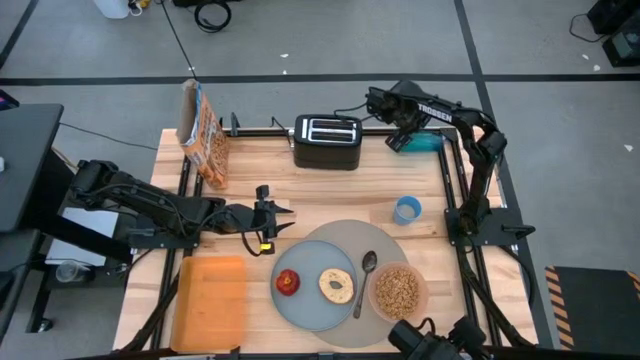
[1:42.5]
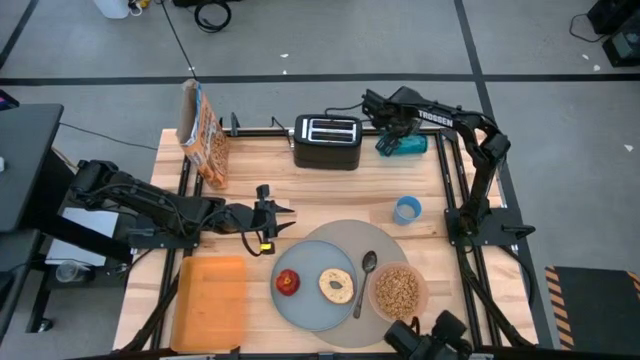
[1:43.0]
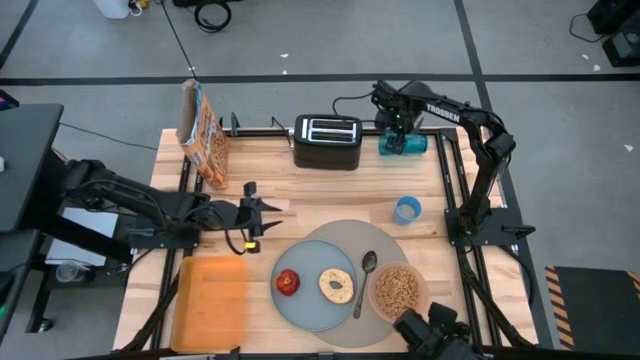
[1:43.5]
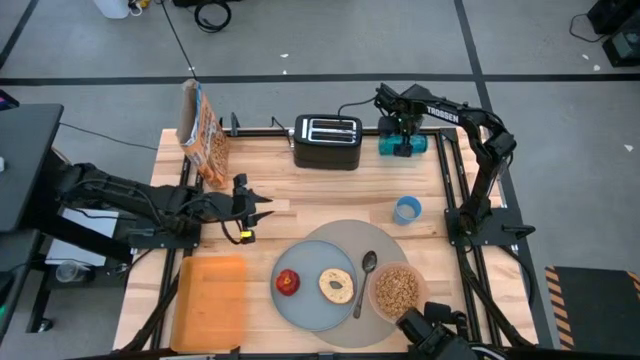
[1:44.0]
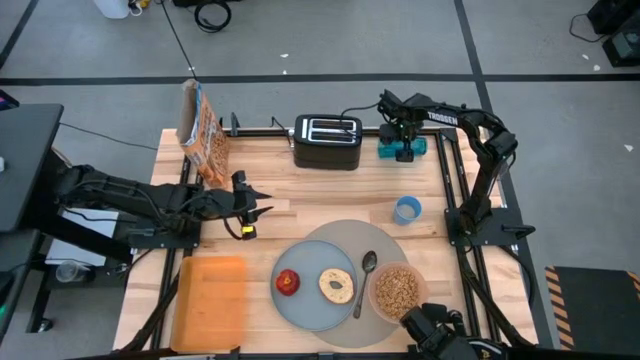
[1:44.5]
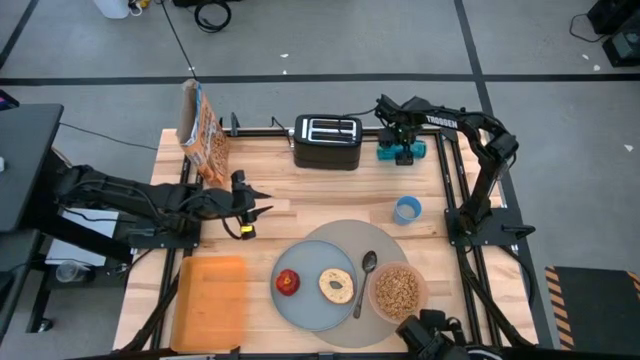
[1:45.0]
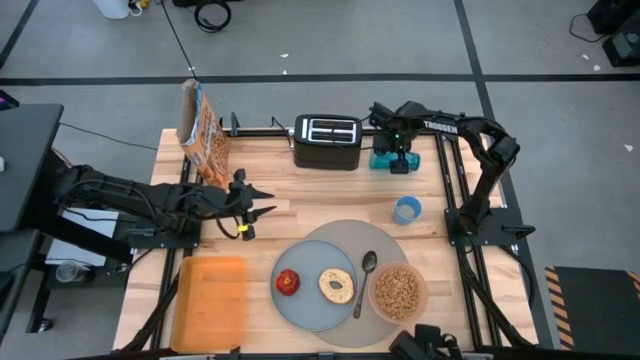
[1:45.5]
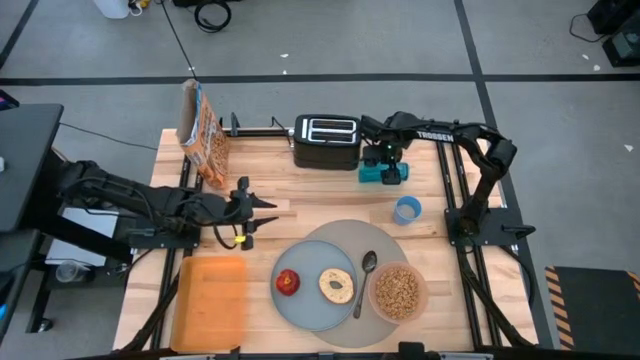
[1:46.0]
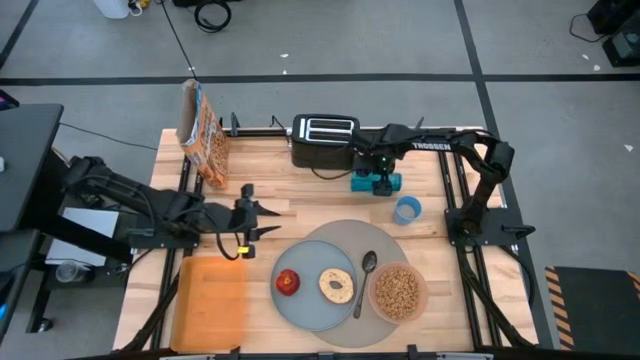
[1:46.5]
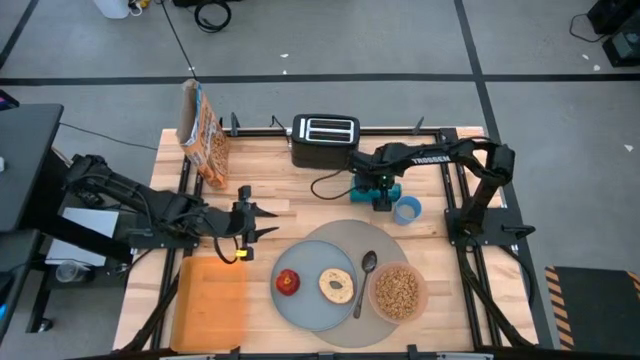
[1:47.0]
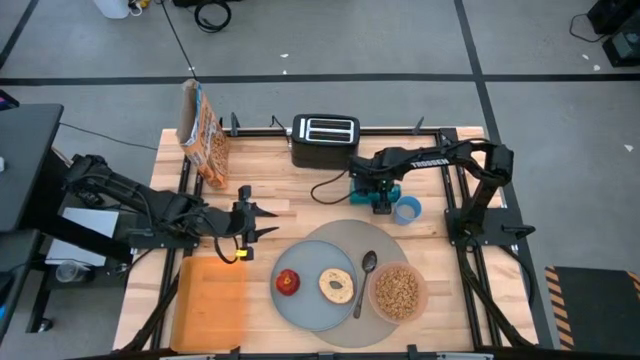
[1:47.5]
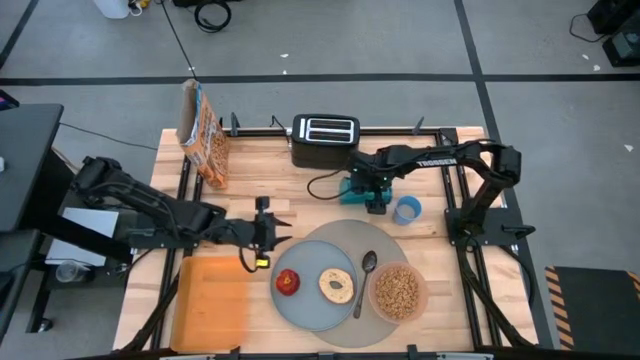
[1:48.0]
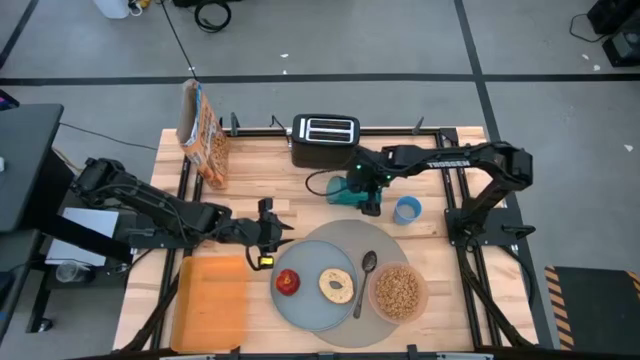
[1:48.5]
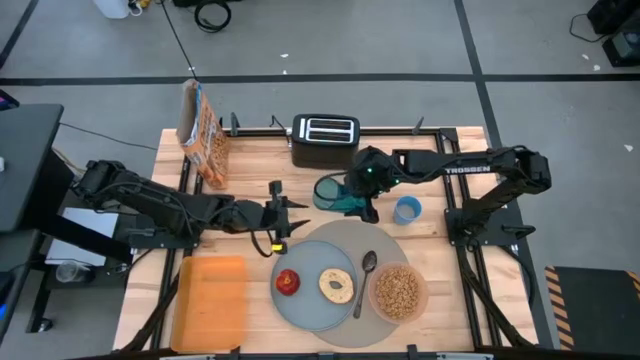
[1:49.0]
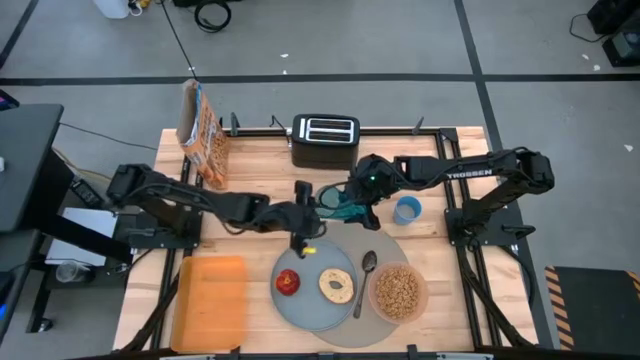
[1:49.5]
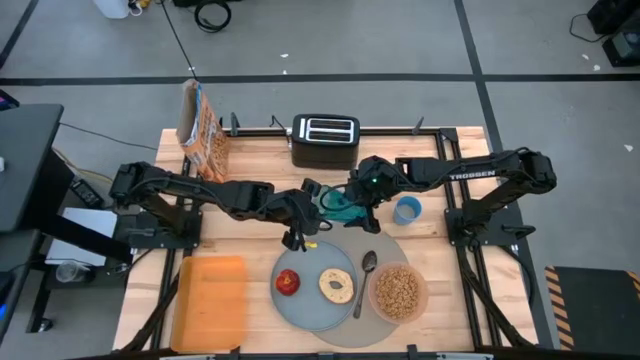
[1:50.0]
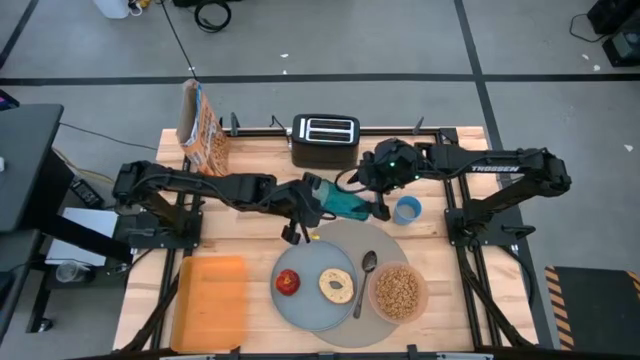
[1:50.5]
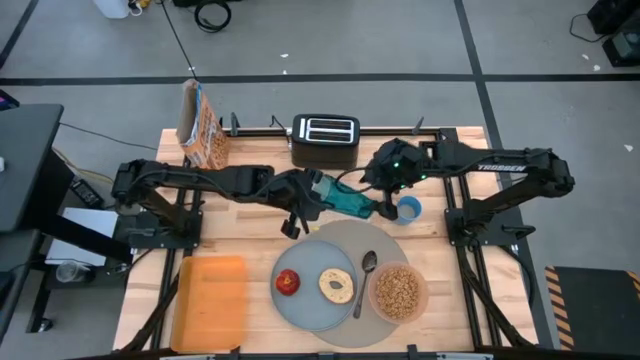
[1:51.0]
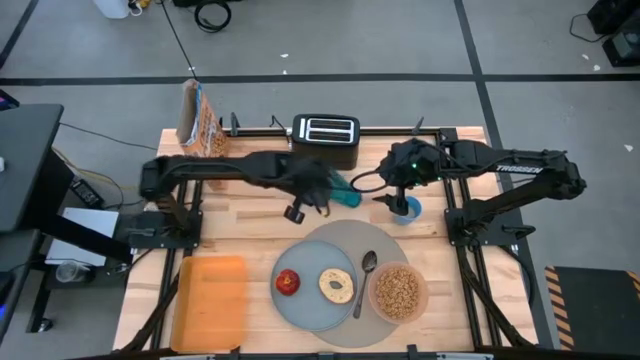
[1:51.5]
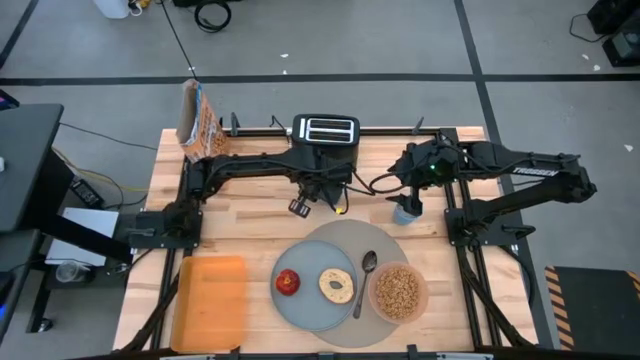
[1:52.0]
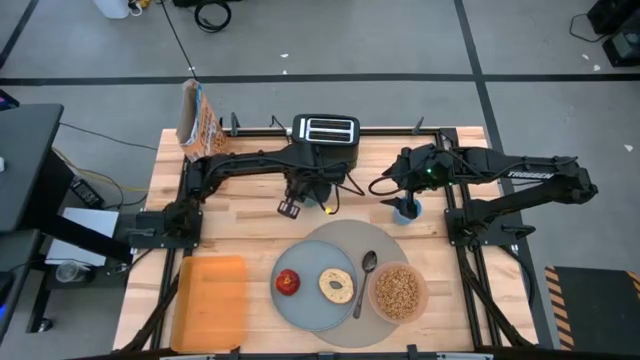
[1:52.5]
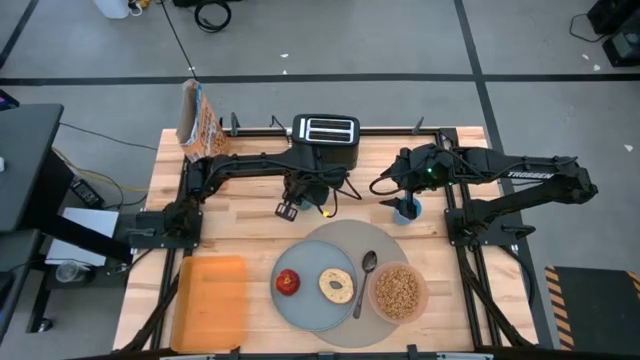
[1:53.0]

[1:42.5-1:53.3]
Task: Arrange a breakfast setting
Move the blue cup to the top of the table placemat

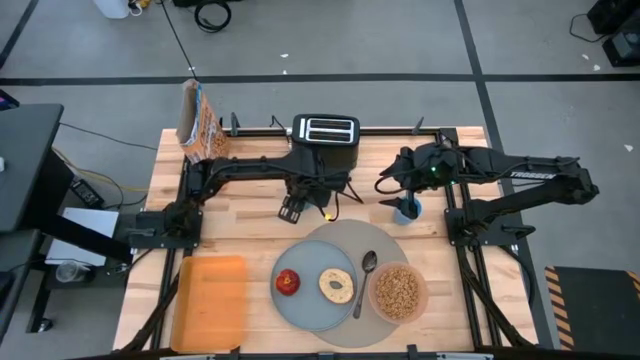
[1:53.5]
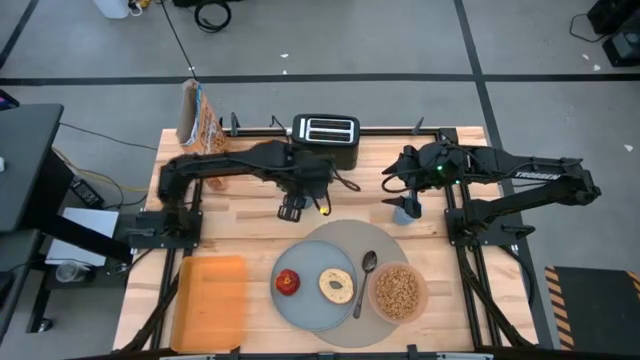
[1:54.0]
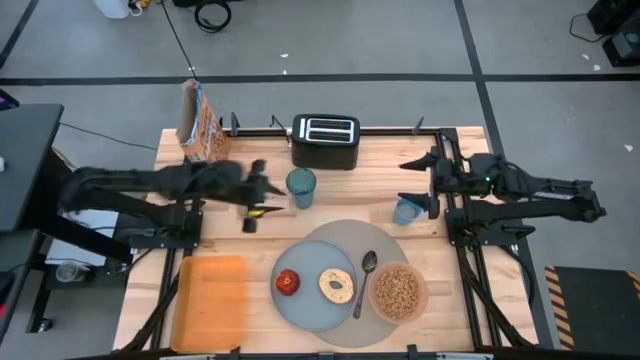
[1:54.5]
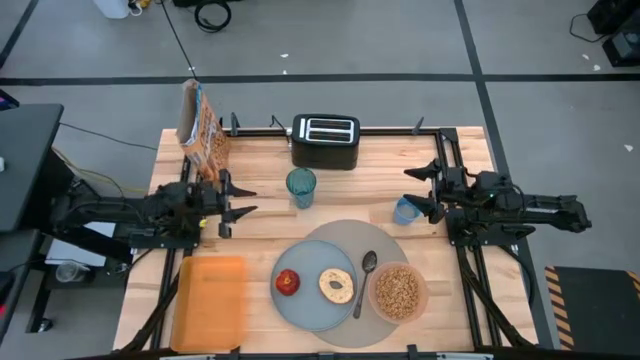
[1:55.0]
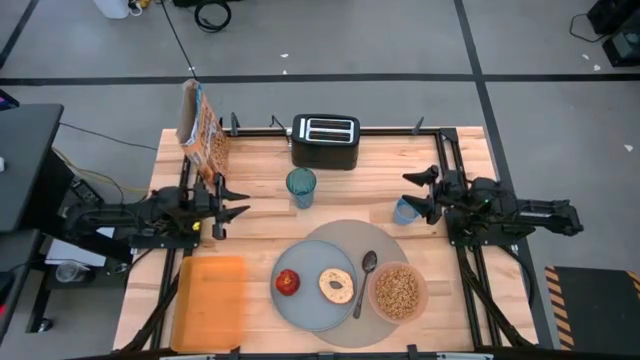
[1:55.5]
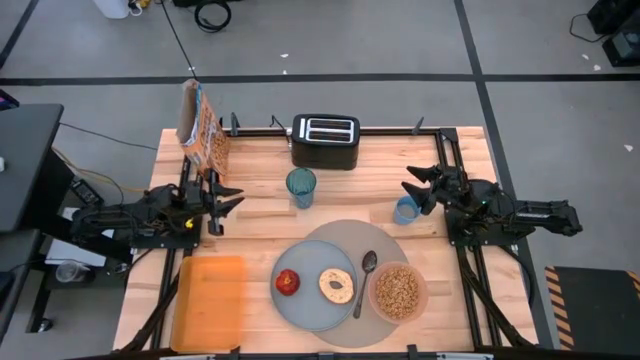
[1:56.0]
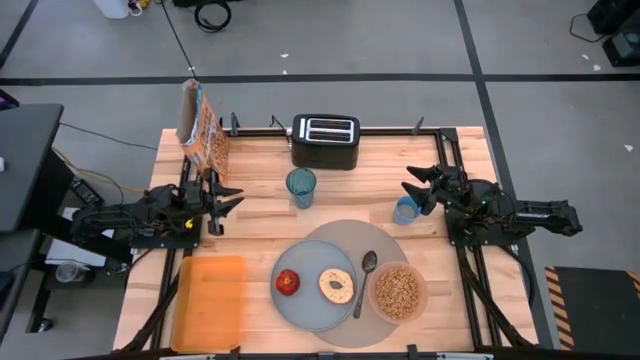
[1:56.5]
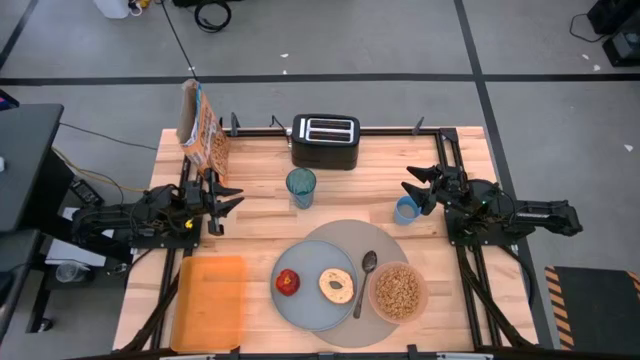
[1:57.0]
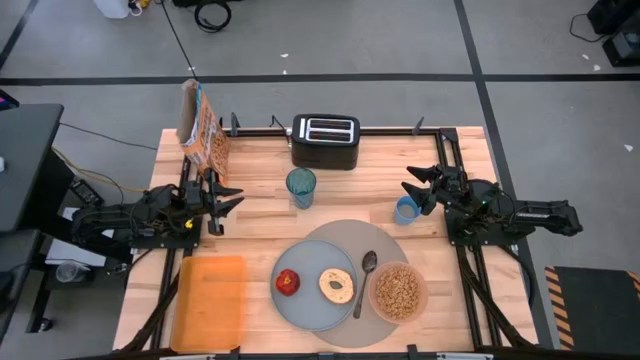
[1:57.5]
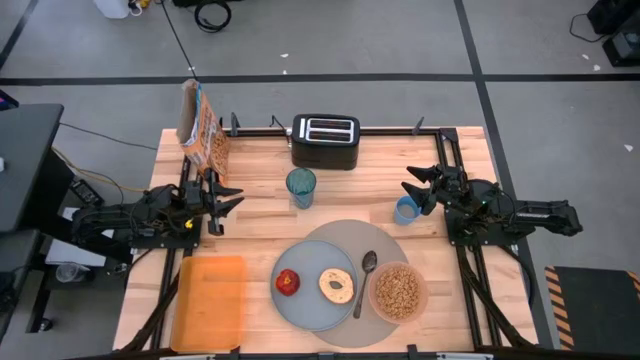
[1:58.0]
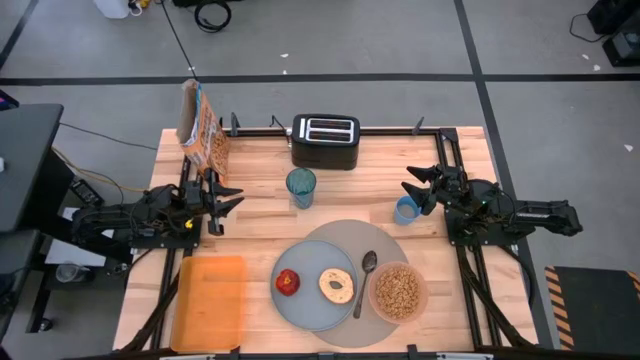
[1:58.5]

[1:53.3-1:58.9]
Return to Home Position

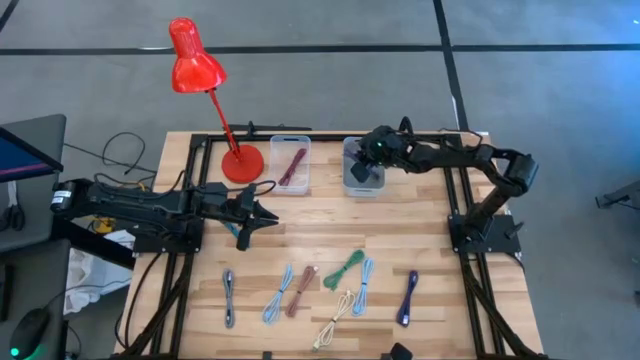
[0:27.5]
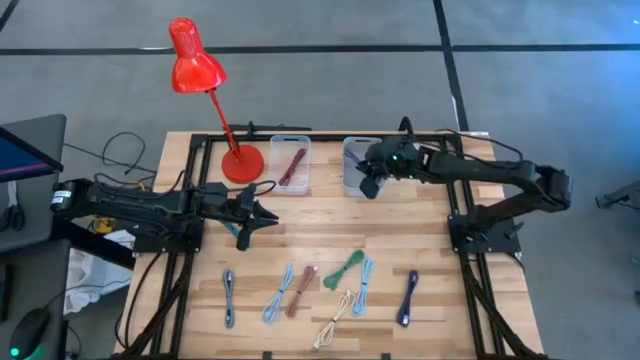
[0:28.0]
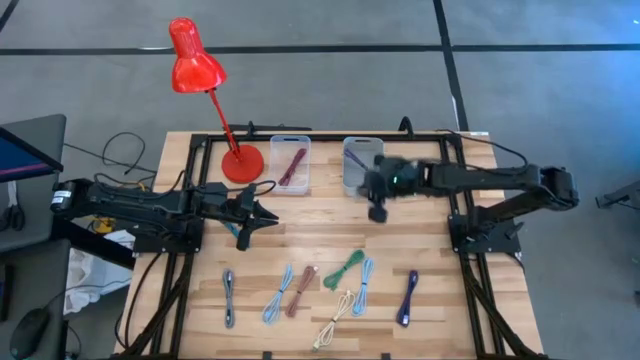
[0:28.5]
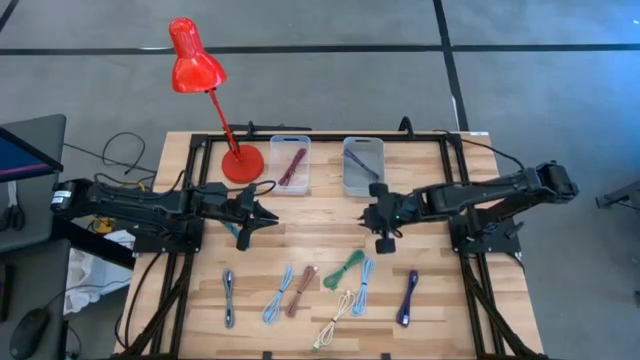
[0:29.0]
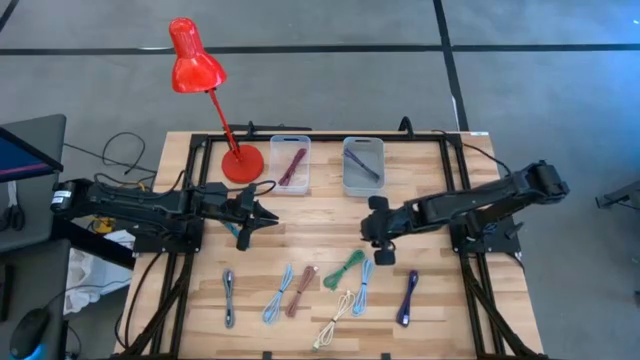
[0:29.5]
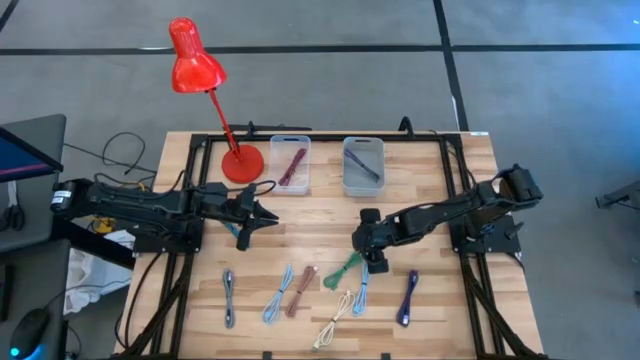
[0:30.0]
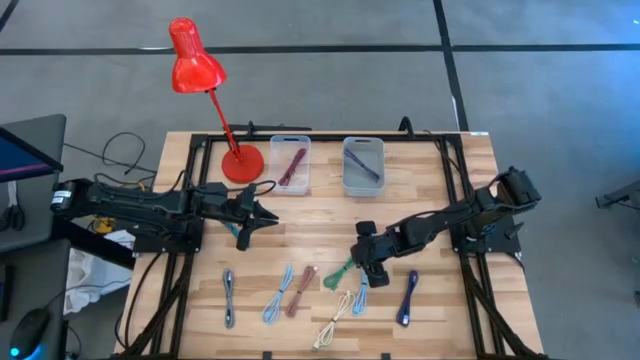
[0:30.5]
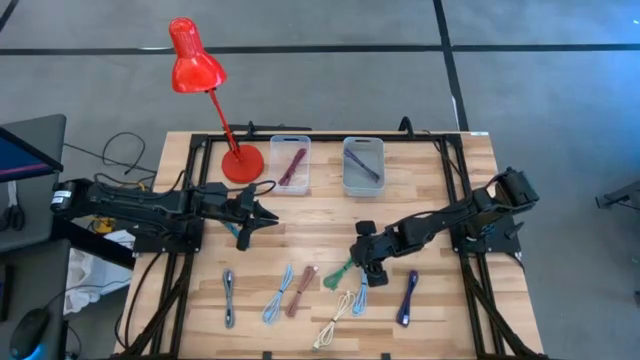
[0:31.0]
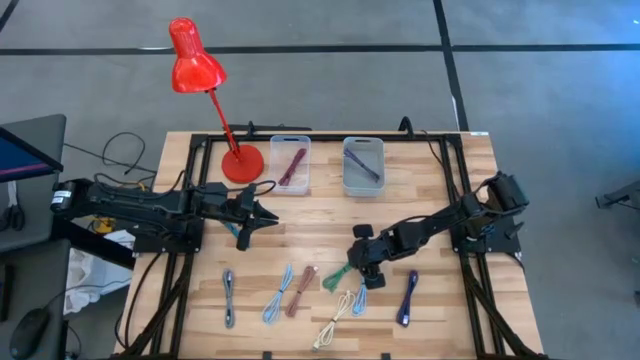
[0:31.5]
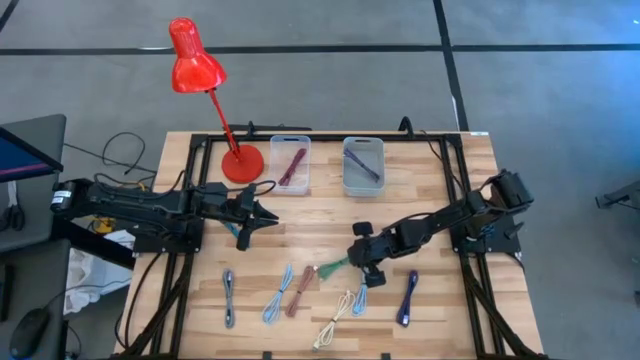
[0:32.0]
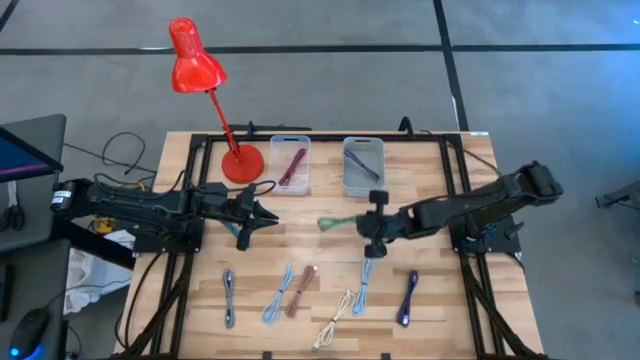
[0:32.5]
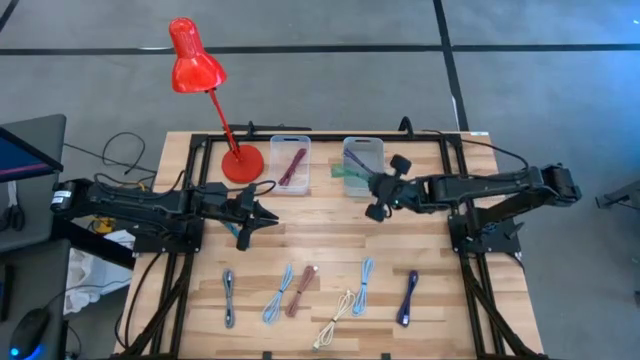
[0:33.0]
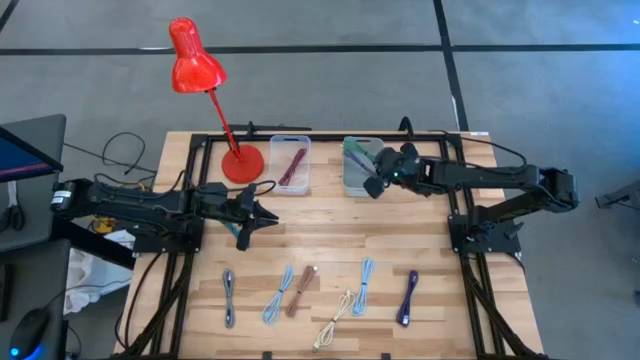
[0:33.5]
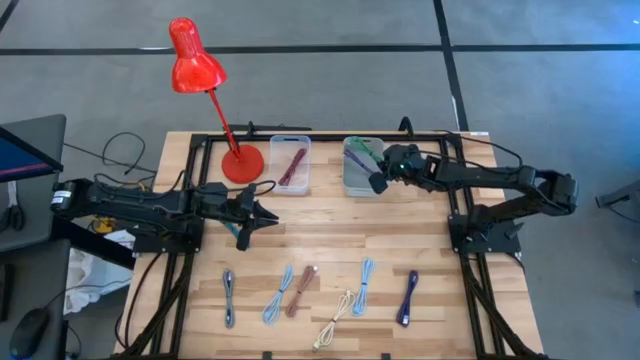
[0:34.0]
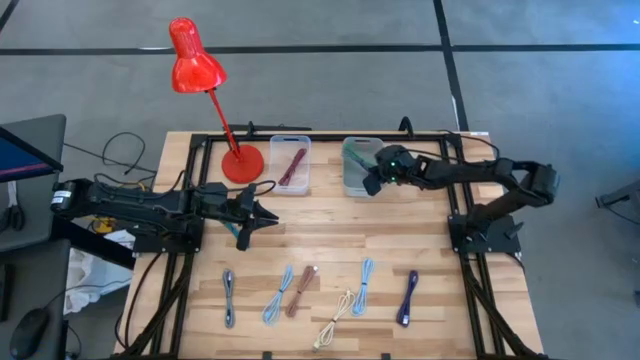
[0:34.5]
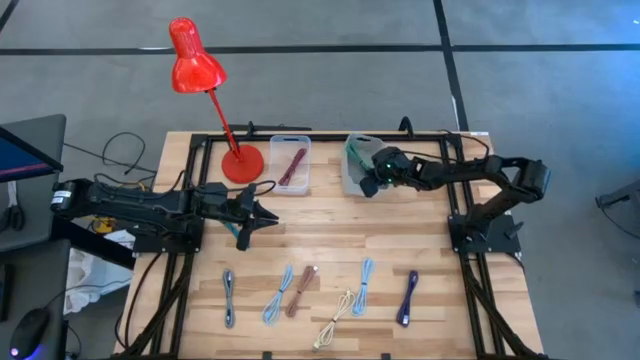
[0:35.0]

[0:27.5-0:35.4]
Task: Pick & Place USB Port
Put the green USB cable into the gray bin
